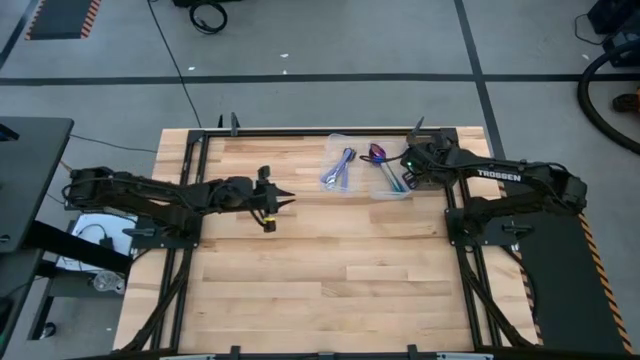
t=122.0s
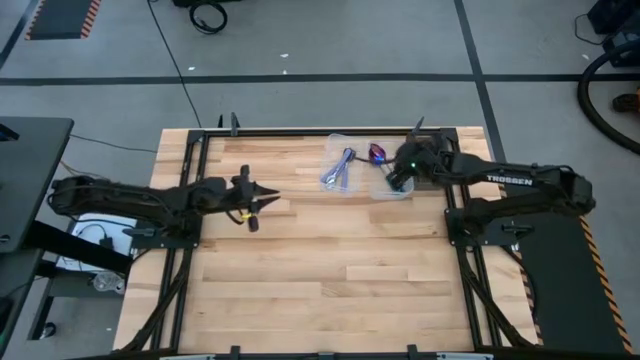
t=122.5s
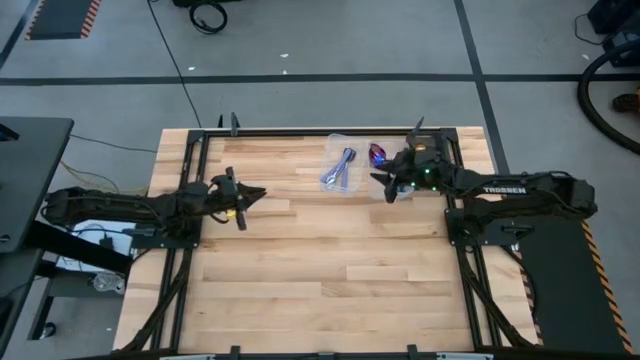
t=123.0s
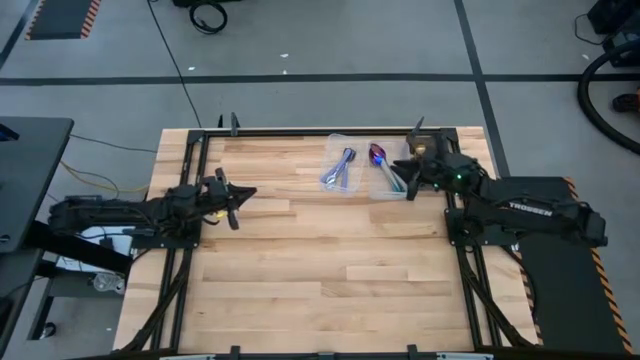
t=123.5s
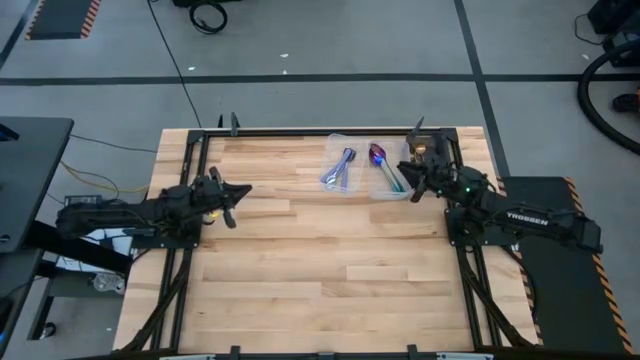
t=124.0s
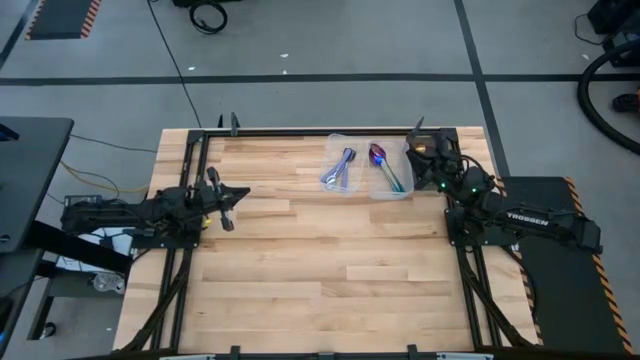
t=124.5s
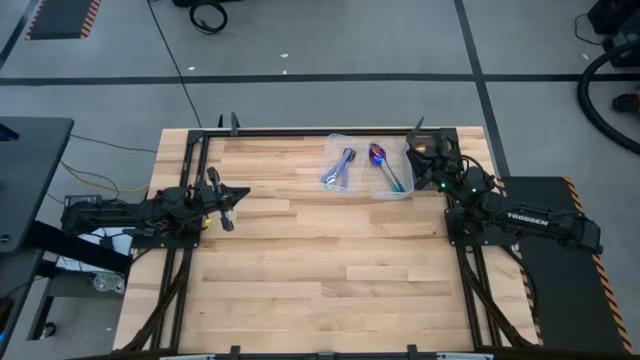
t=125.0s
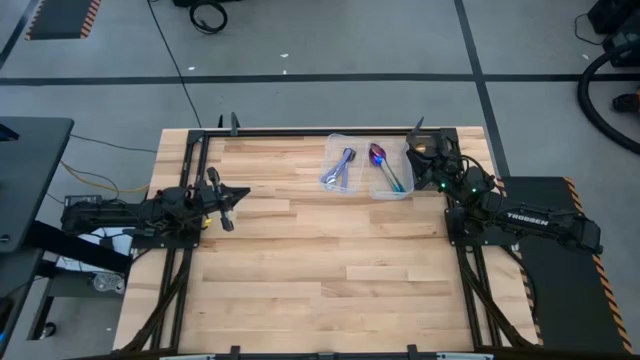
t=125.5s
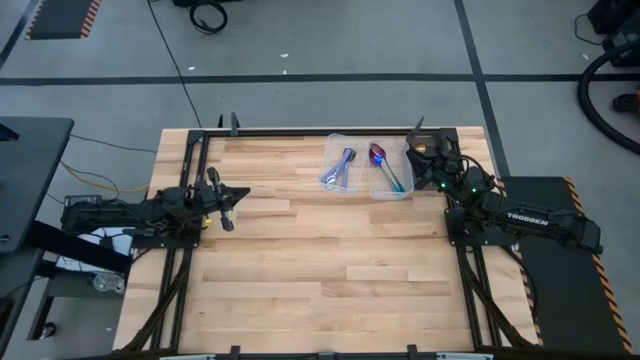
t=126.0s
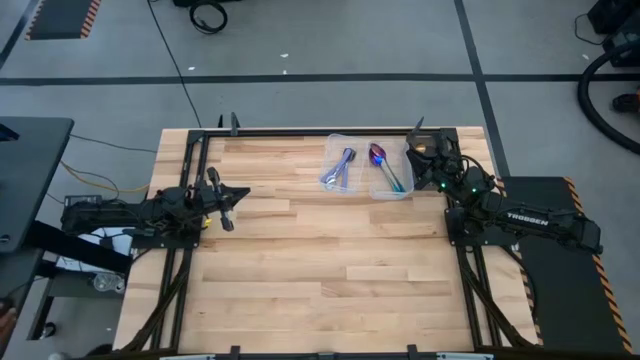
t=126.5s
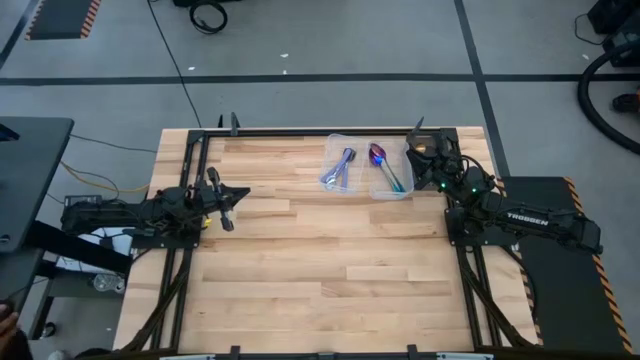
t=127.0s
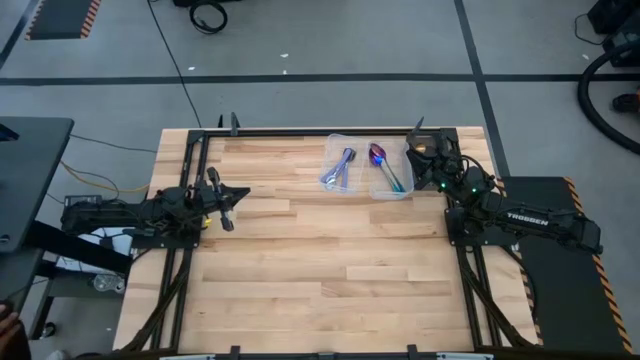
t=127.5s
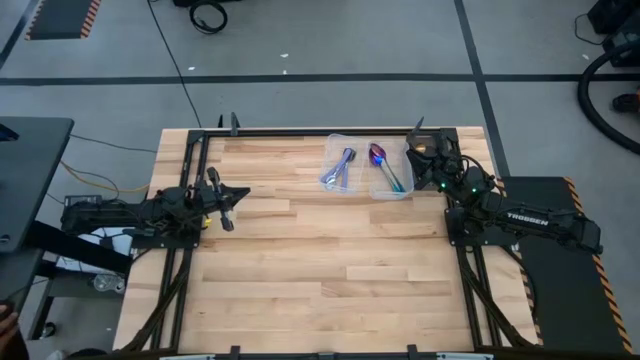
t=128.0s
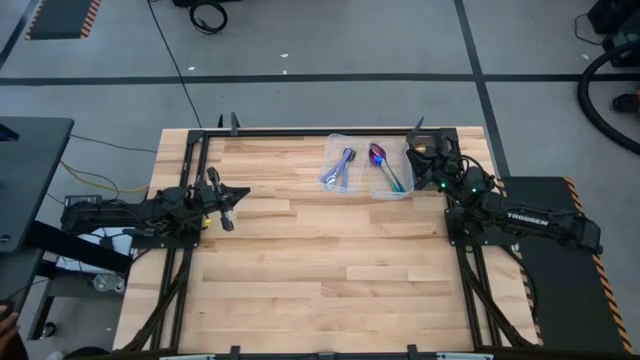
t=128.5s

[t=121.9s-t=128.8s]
Task: Sort silverware by color (type)
Return to Home Position

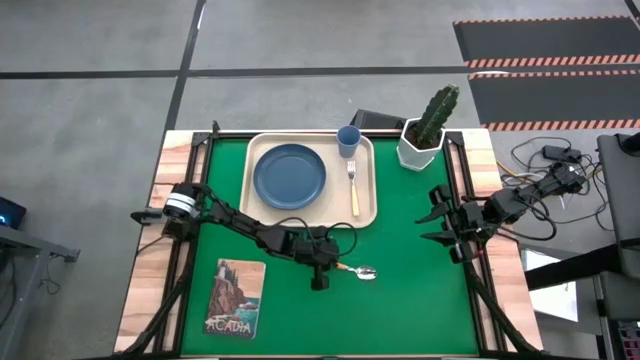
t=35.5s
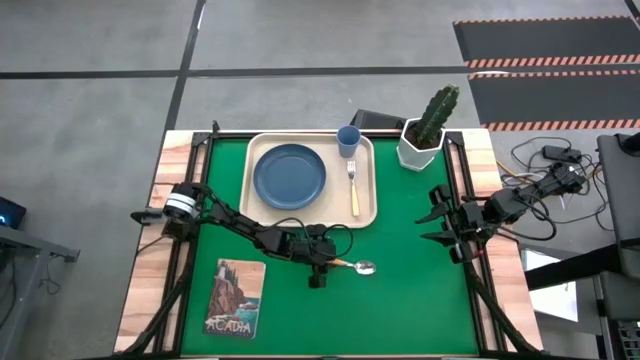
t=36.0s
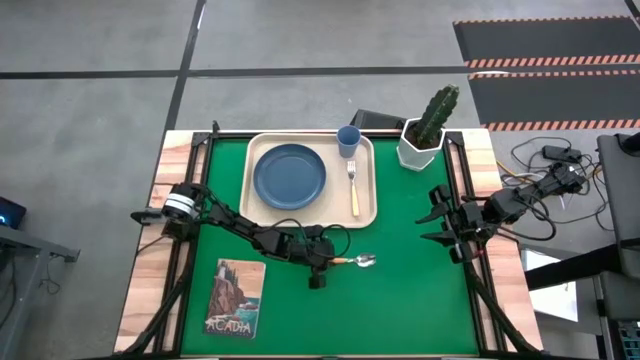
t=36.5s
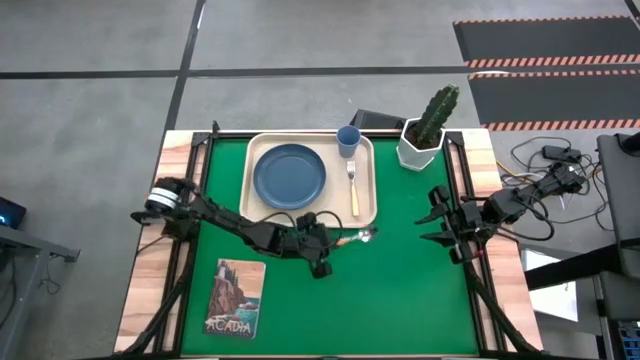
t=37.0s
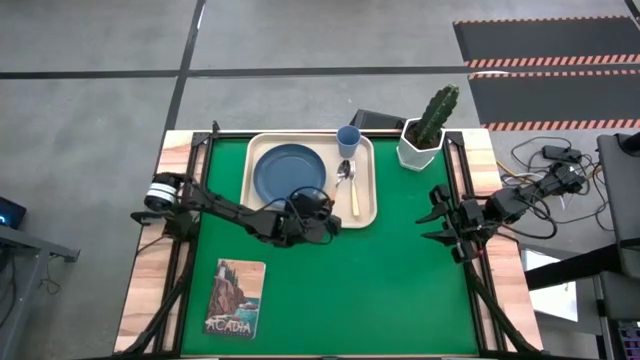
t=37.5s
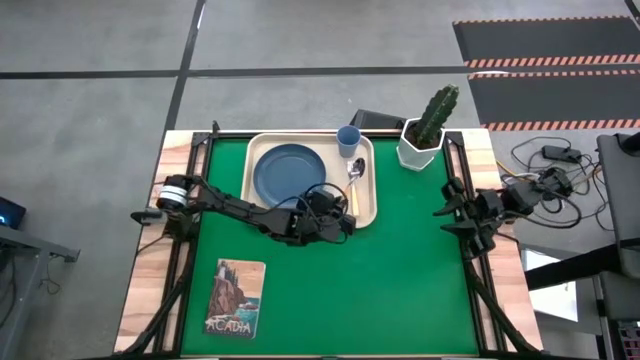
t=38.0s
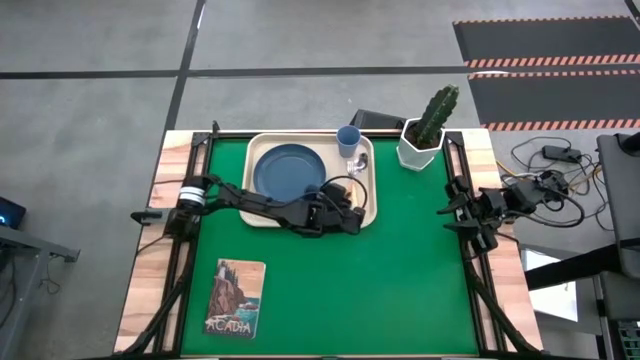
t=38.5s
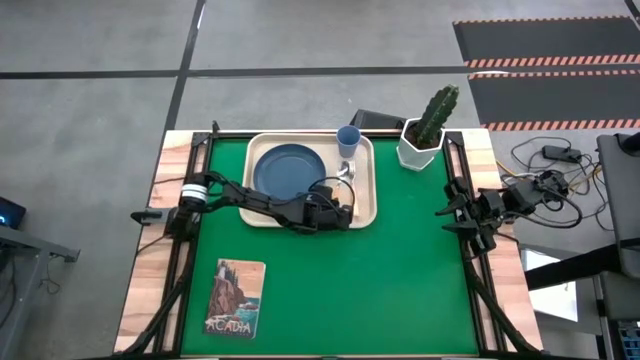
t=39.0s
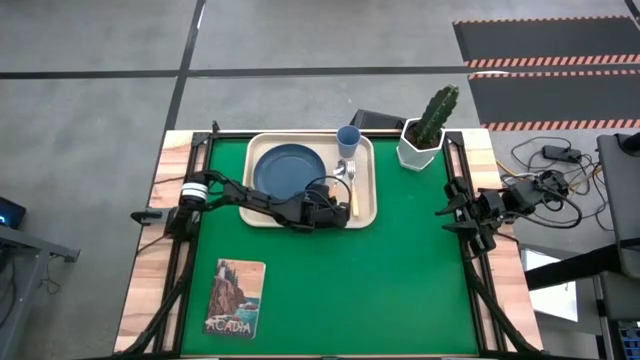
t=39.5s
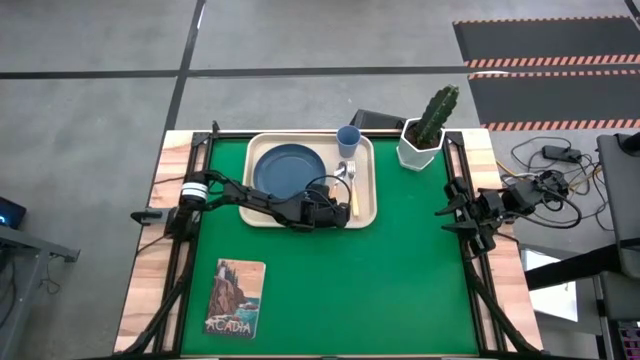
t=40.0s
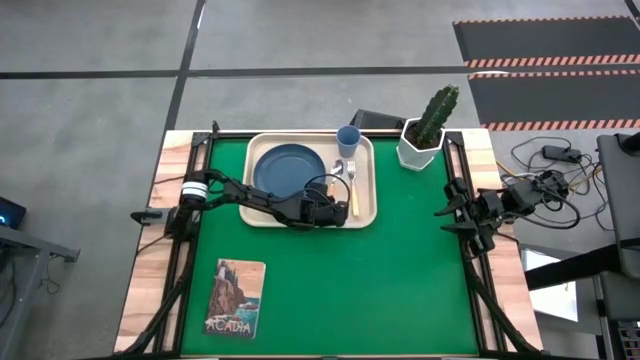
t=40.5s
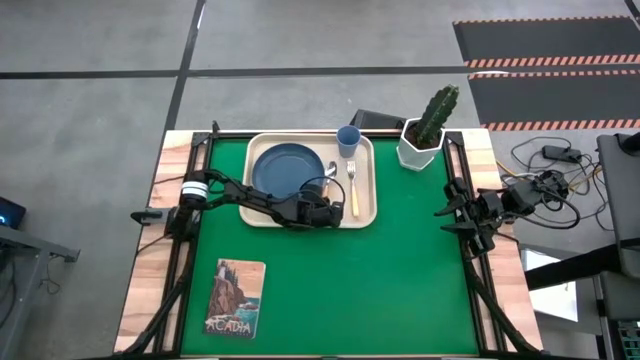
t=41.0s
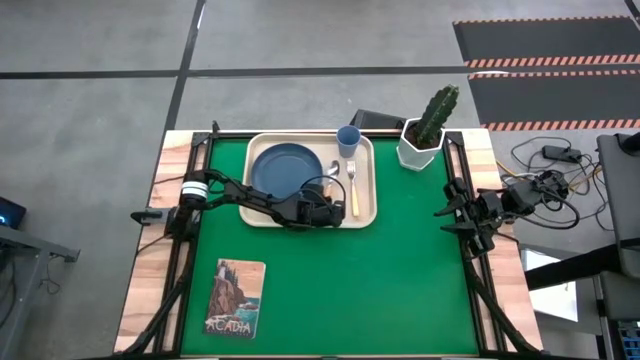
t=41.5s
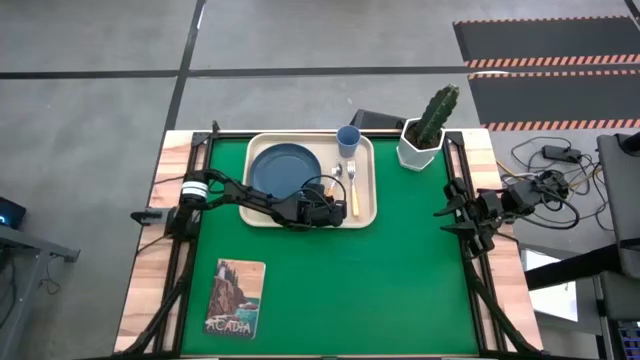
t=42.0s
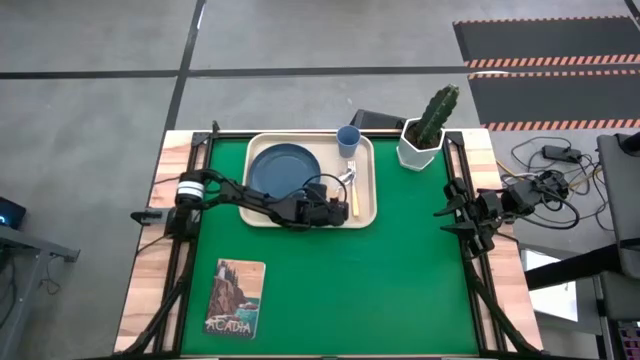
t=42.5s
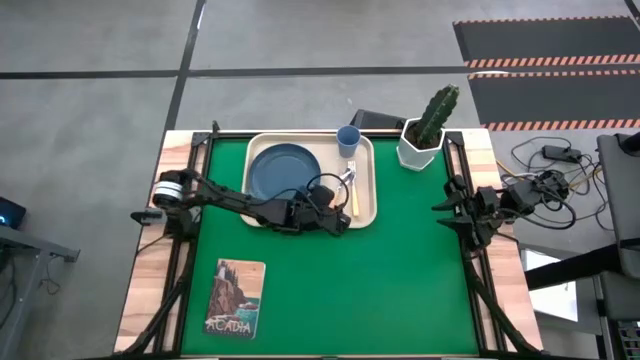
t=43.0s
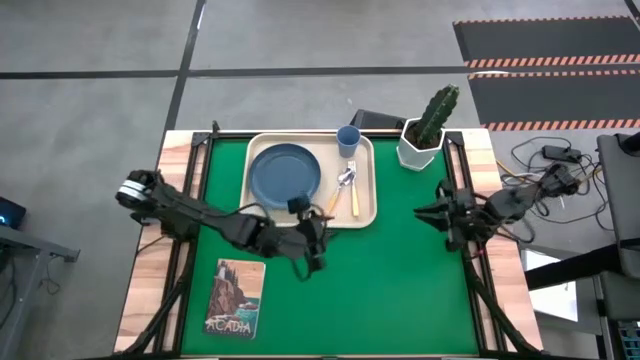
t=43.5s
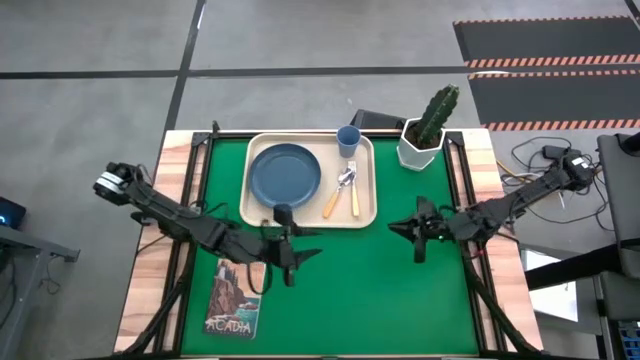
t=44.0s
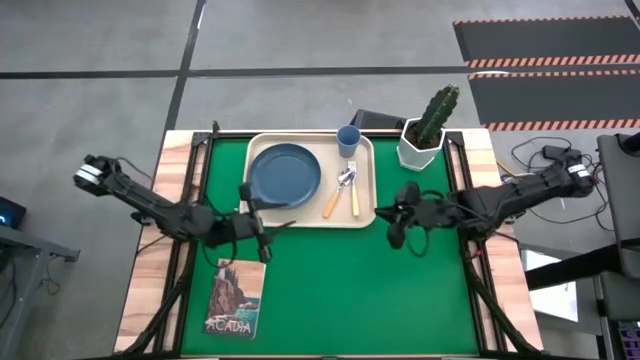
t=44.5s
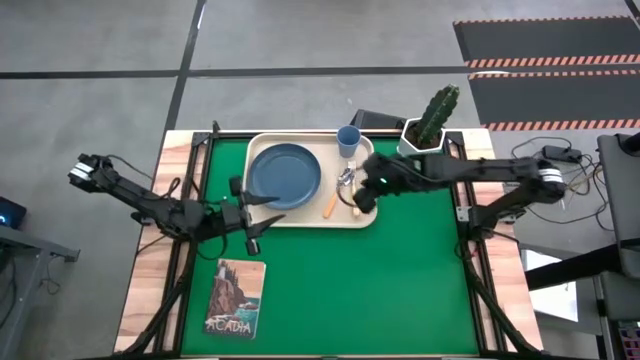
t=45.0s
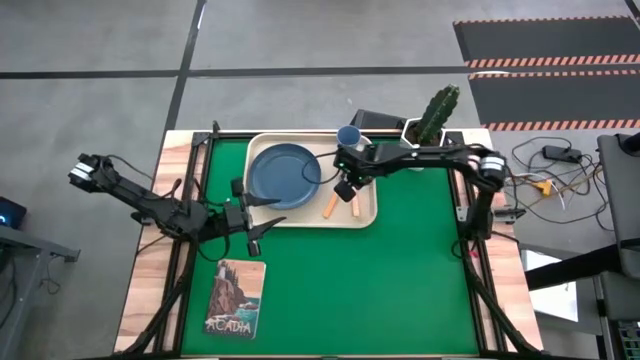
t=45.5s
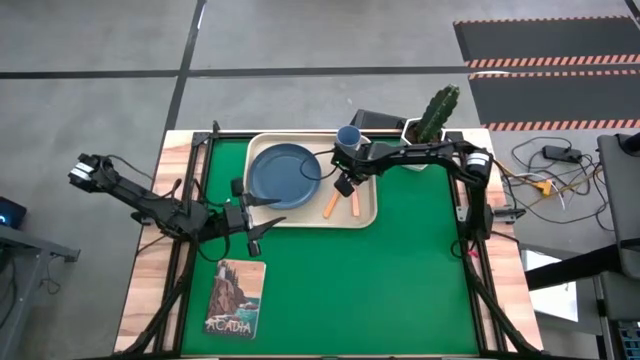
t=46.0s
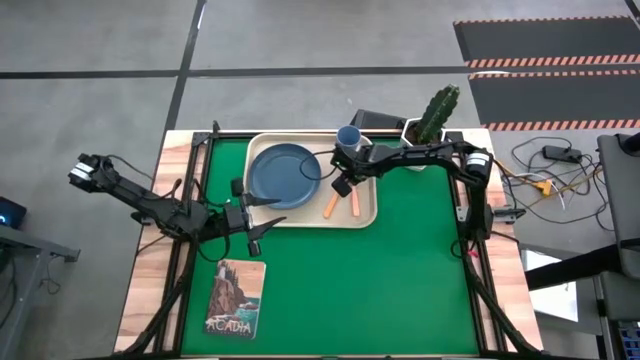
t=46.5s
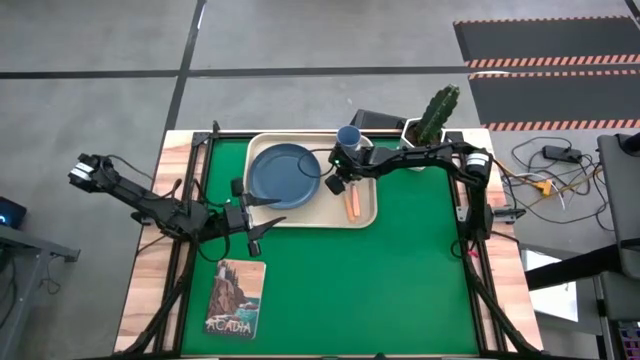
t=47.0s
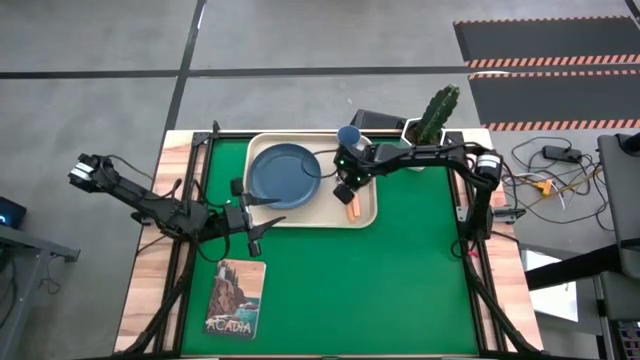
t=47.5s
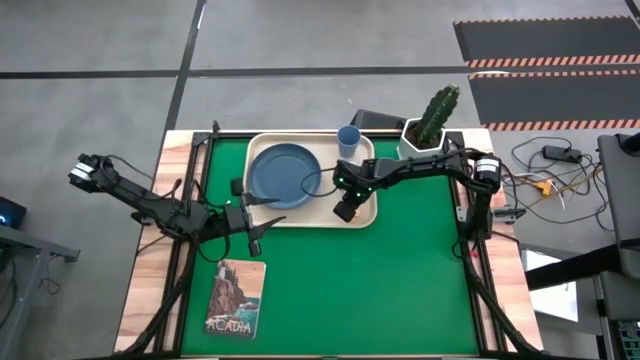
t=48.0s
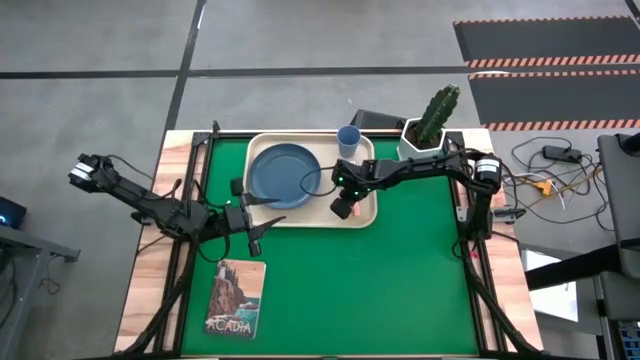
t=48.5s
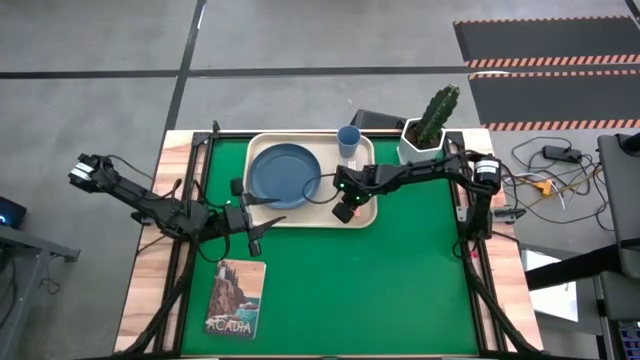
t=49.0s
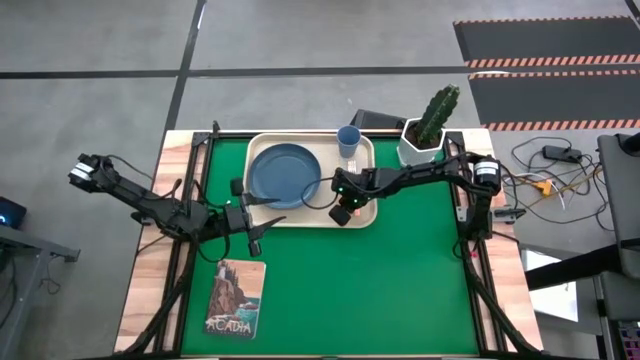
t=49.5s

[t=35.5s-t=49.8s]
Task: Pick and place plate/cup/fork/spoon on tray
Put the yellow spoon on the white tray

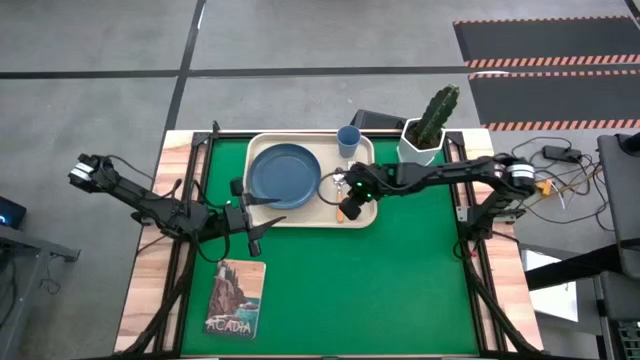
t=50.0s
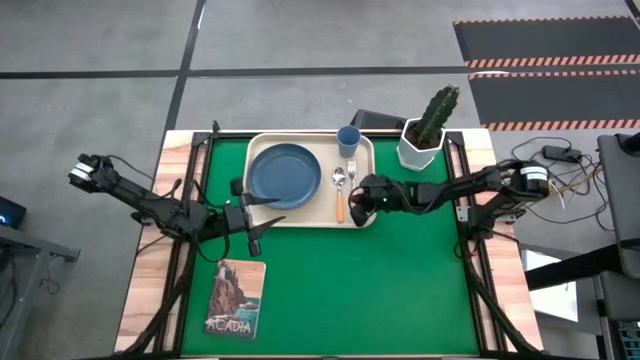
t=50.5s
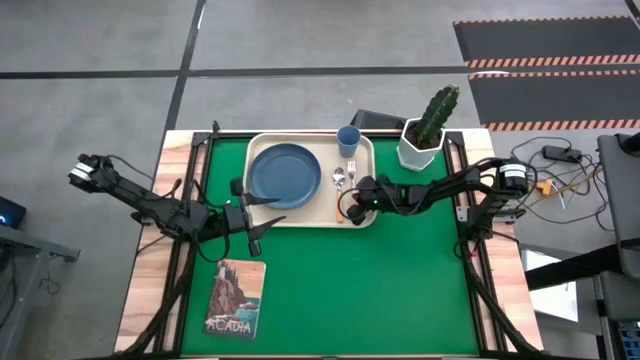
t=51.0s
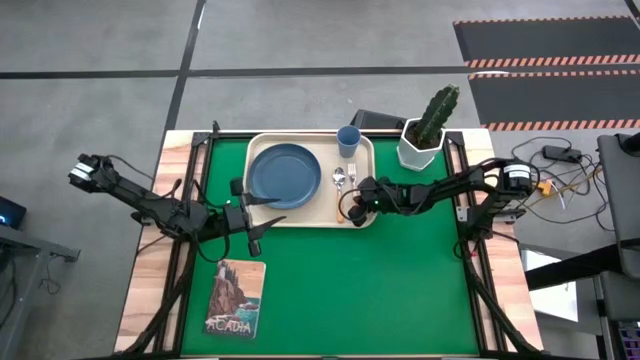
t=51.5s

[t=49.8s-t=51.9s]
Adjust the yellow fork
